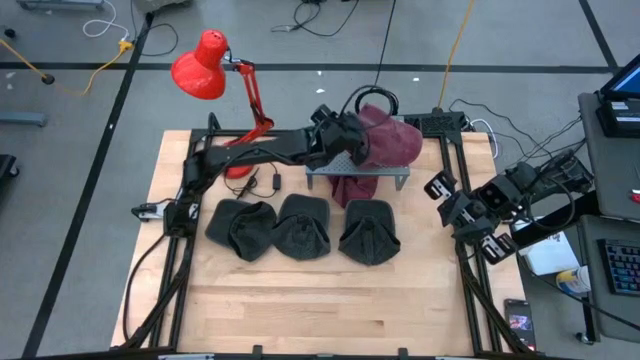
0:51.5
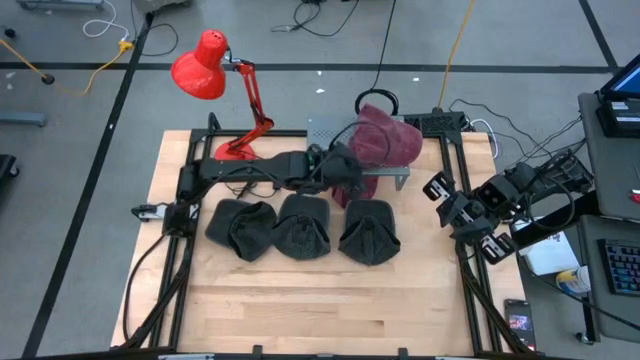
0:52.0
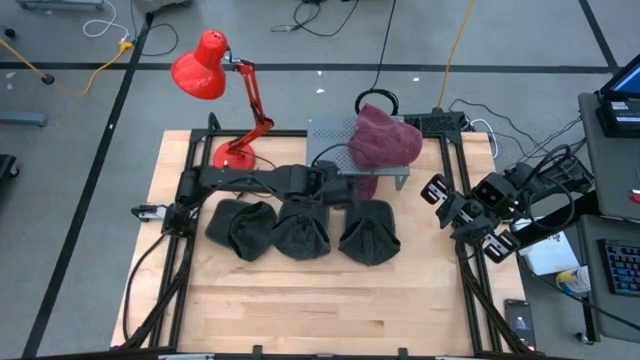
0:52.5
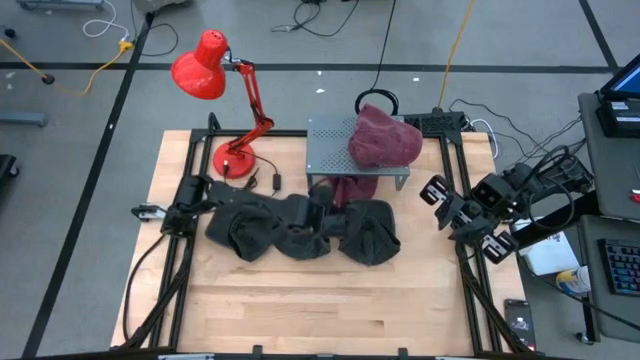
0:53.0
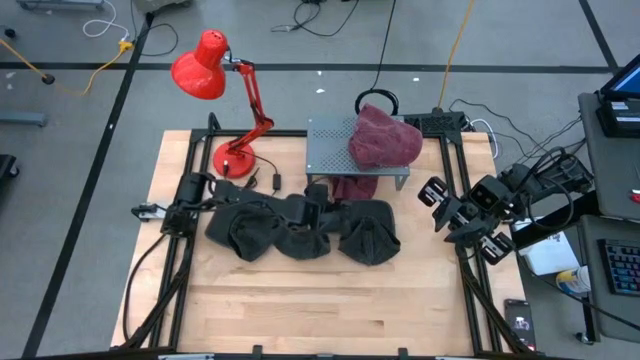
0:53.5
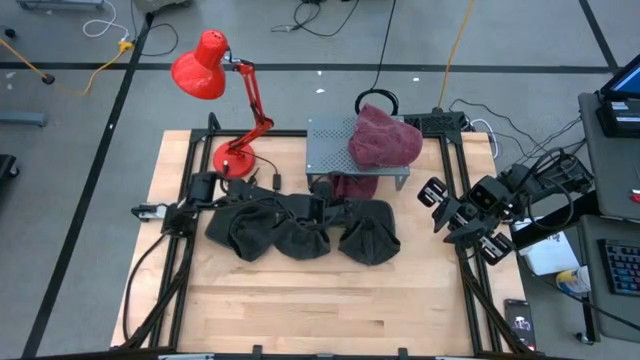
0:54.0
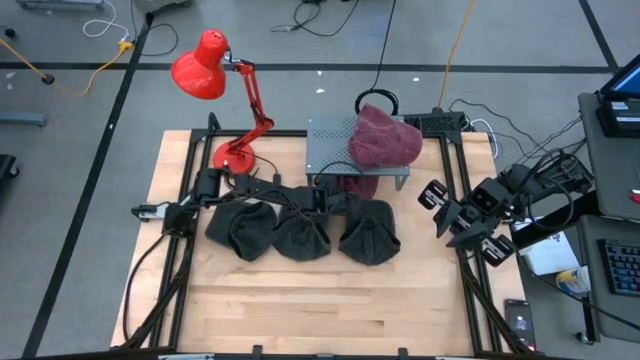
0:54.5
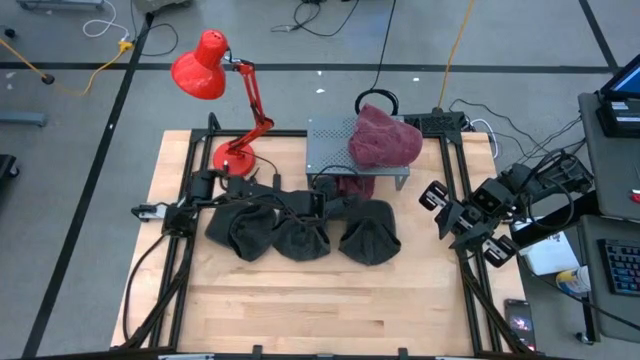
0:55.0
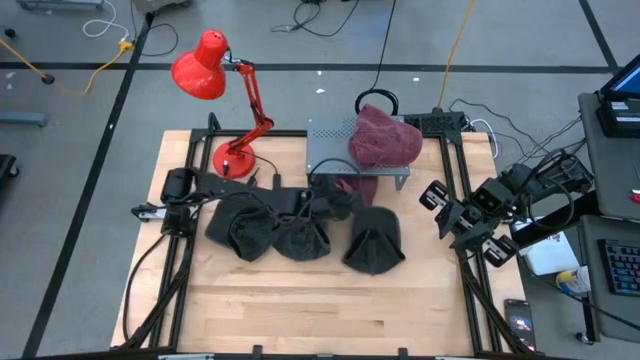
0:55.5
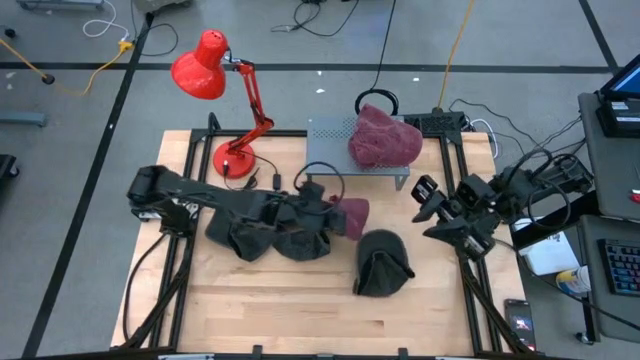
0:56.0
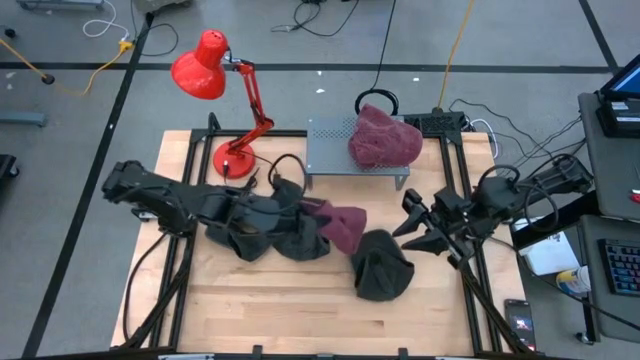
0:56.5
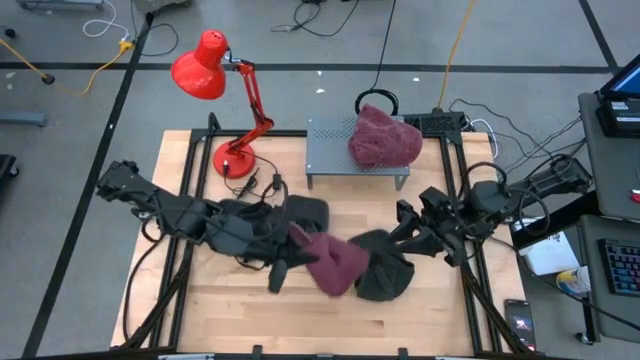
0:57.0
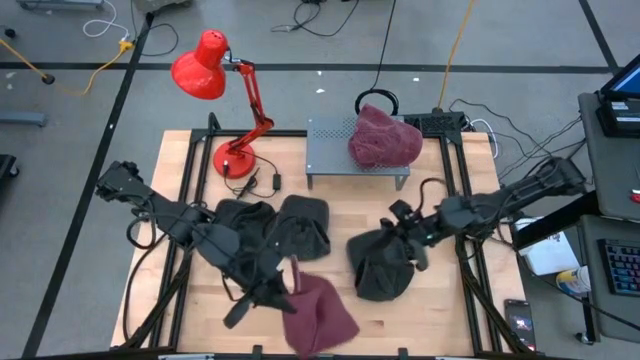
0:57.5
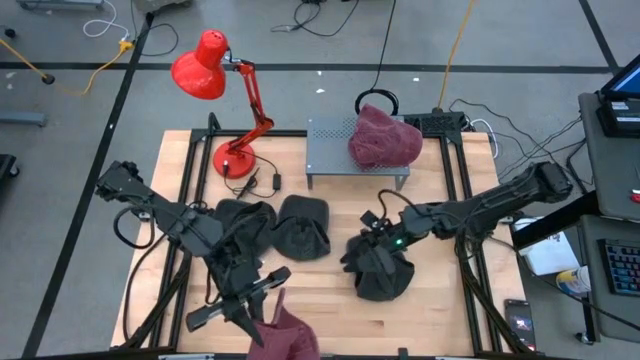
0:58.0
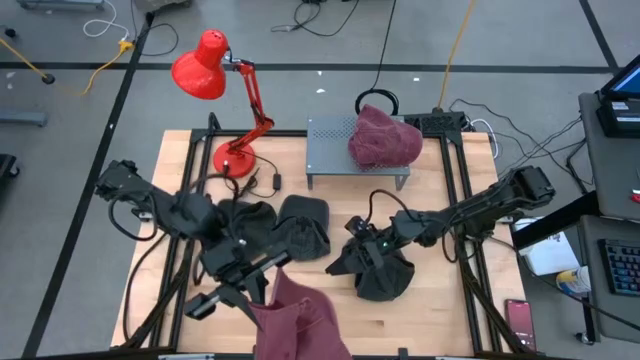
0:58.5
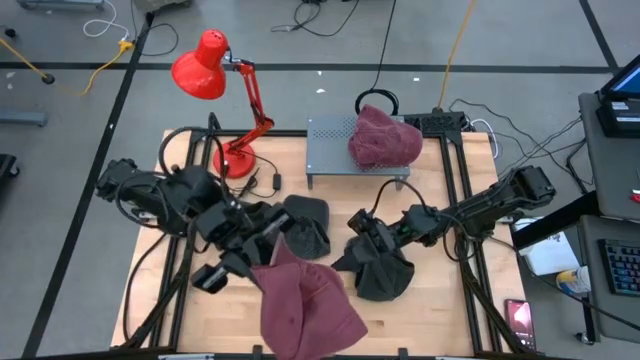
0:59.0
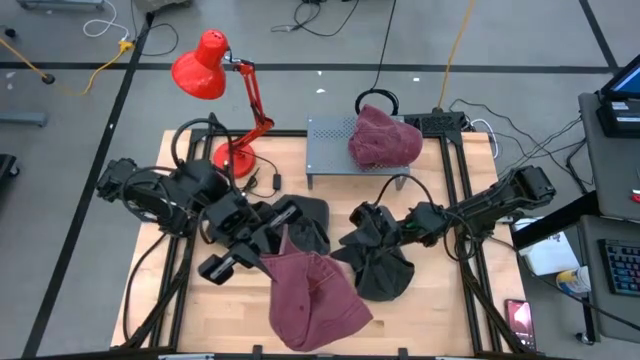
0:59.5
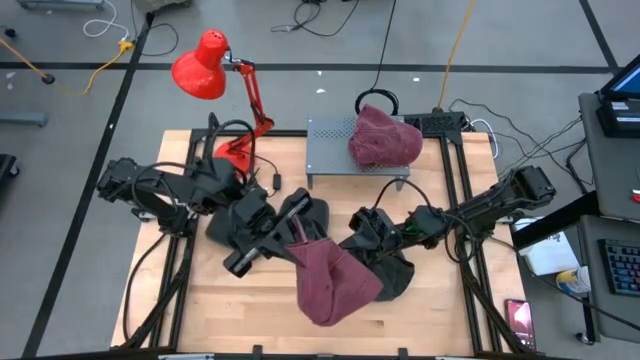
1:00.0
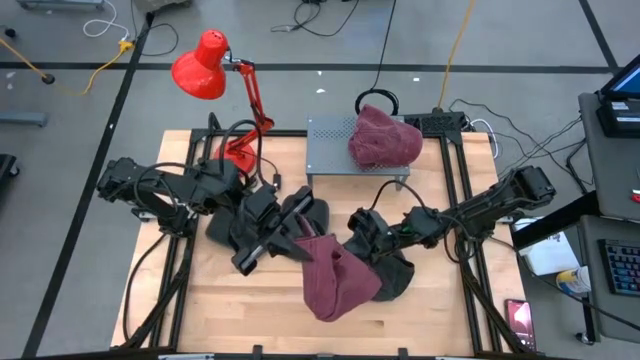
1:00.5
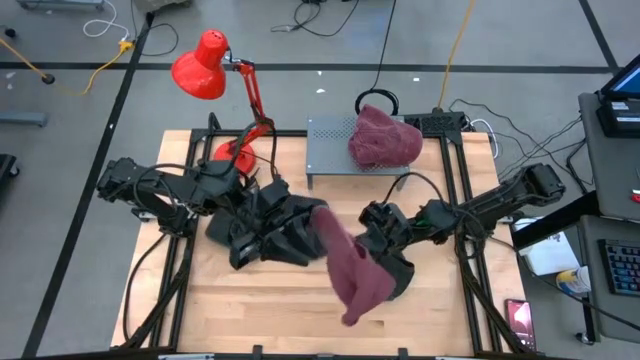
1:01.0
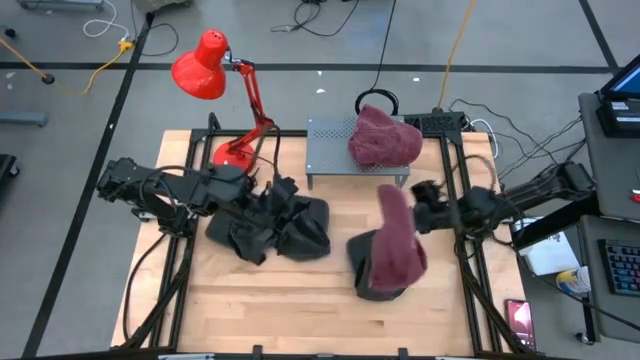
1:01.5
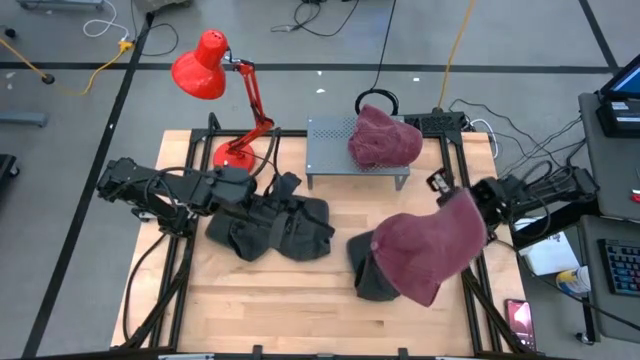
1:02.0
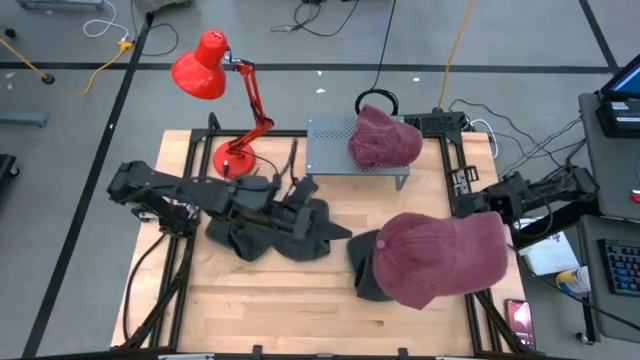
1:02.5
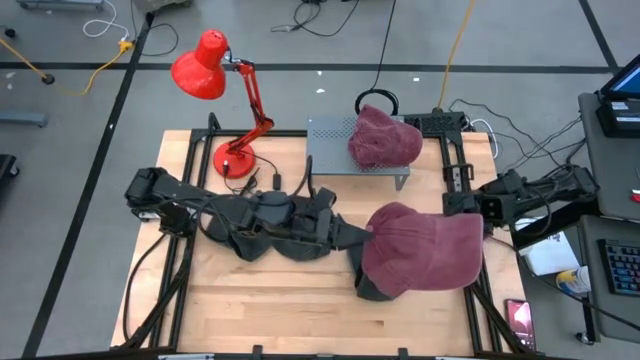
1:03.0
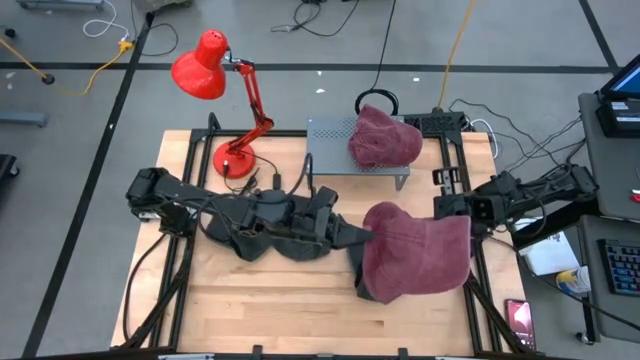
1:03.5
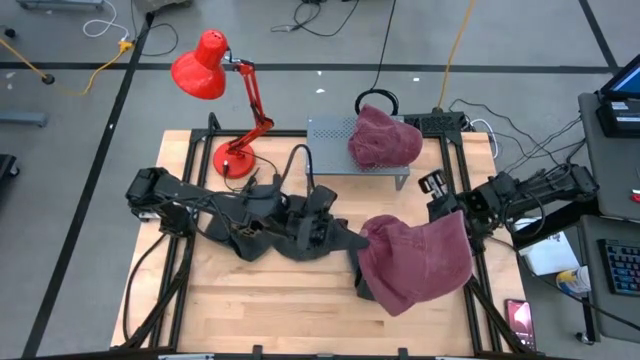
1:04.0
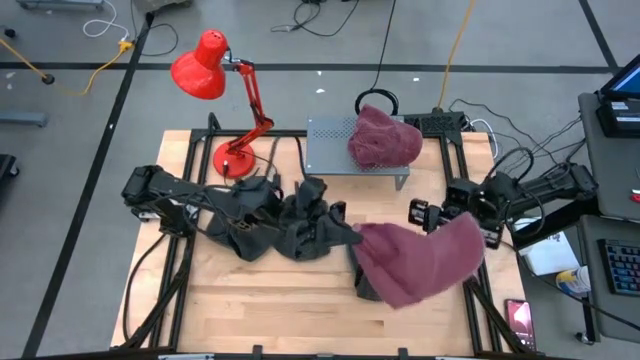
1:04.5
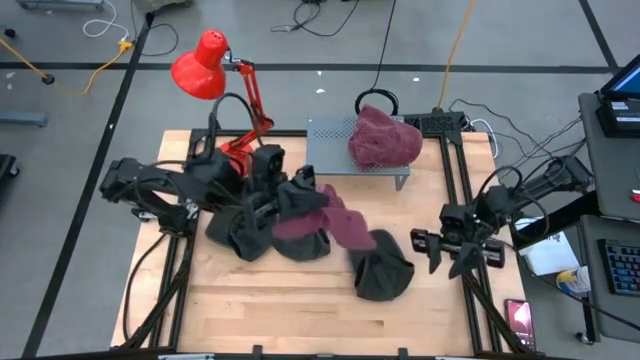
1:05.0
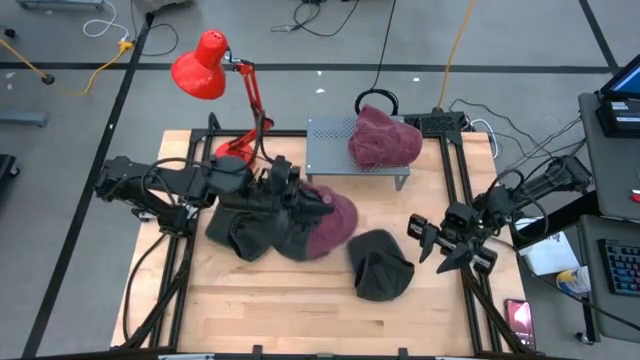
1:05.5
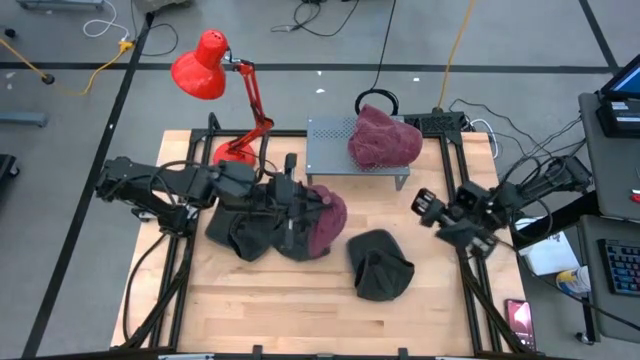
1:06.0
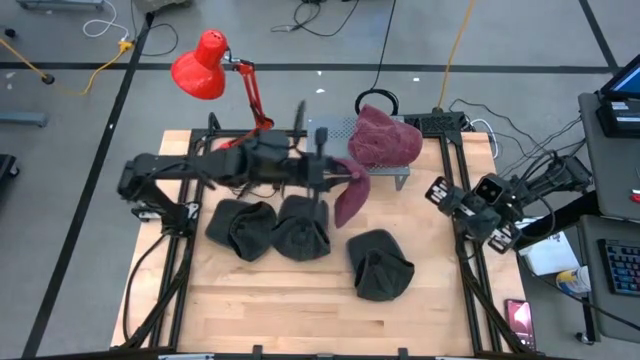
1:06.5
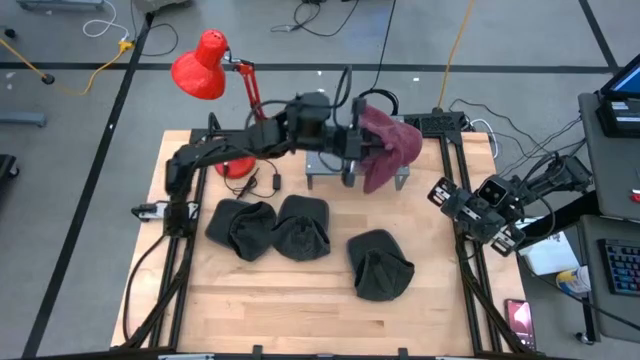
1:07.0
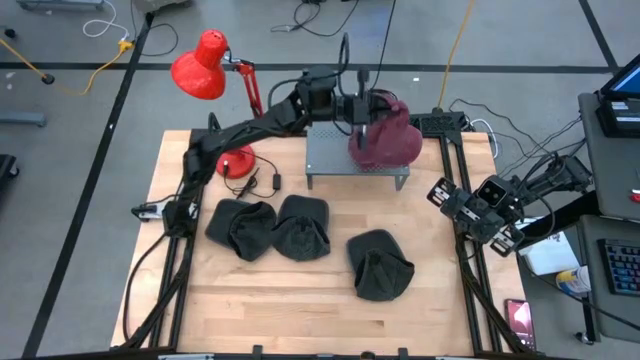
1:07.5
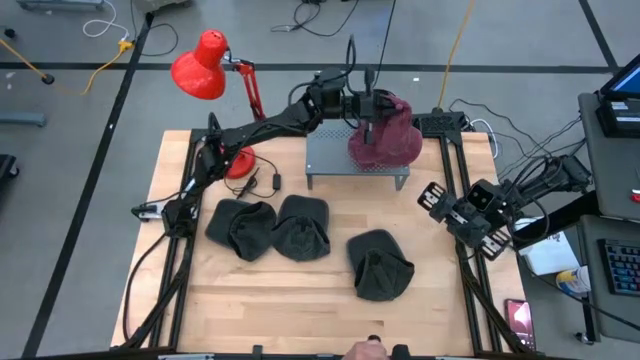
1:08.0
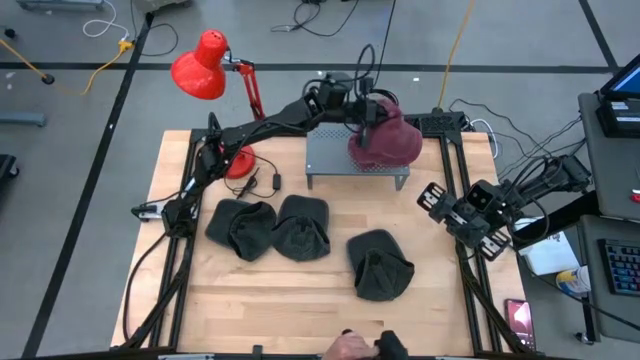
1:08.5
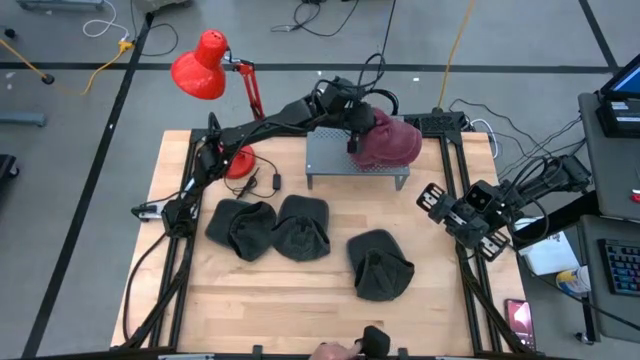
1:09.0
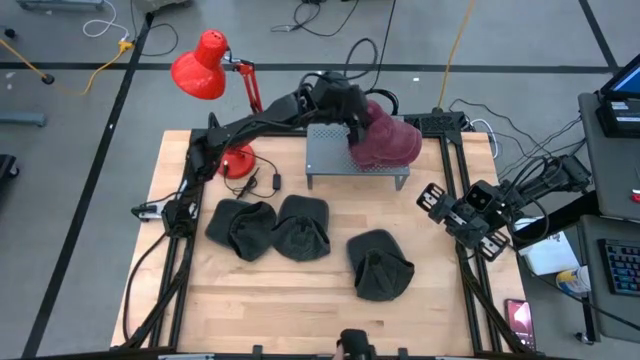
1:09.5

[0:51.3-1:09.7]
Task: Pick & Place hat
Stack the red cap on the red cap on the shelf

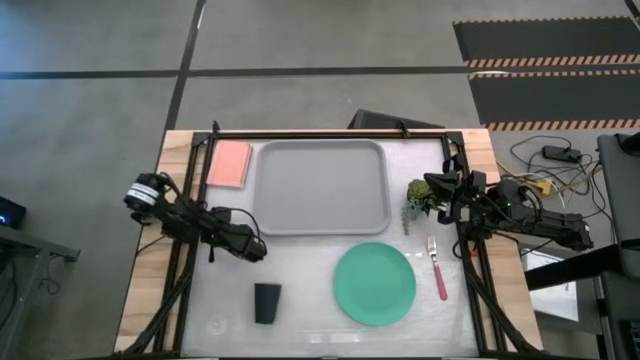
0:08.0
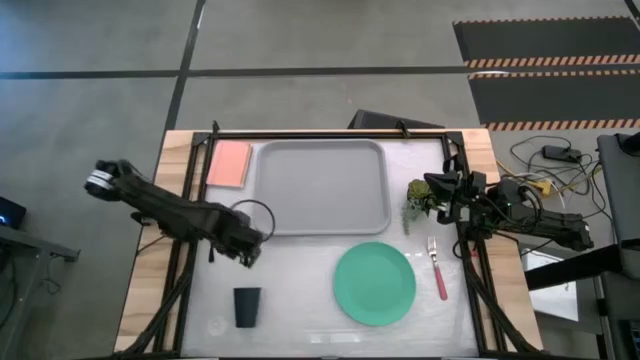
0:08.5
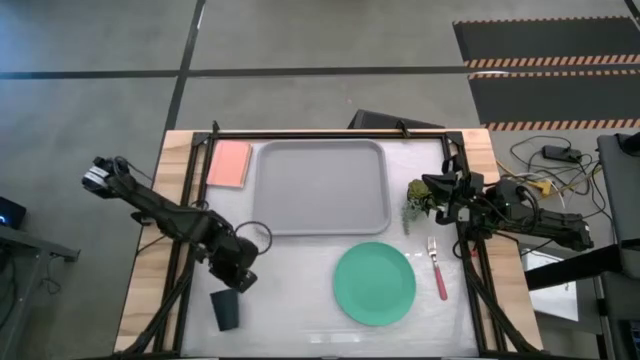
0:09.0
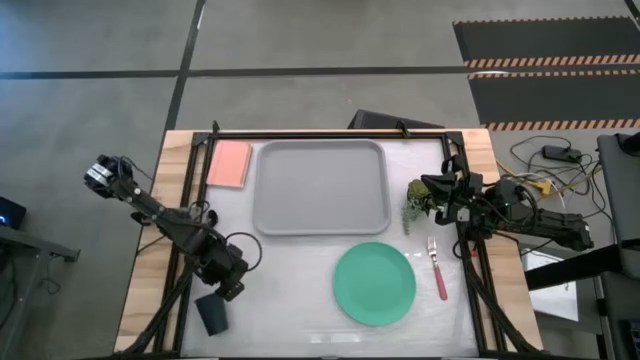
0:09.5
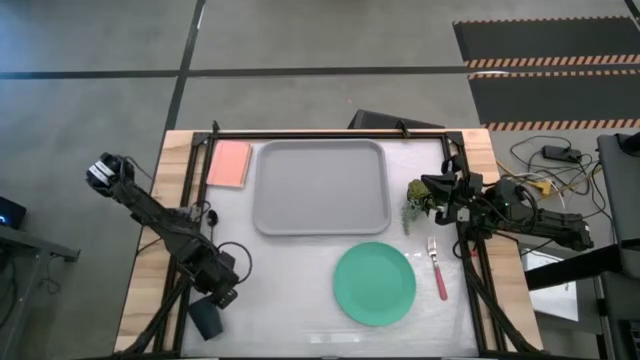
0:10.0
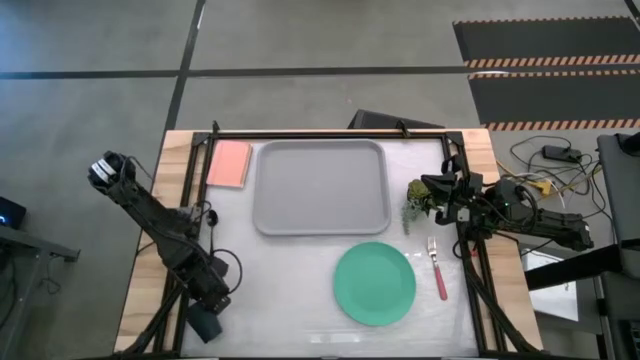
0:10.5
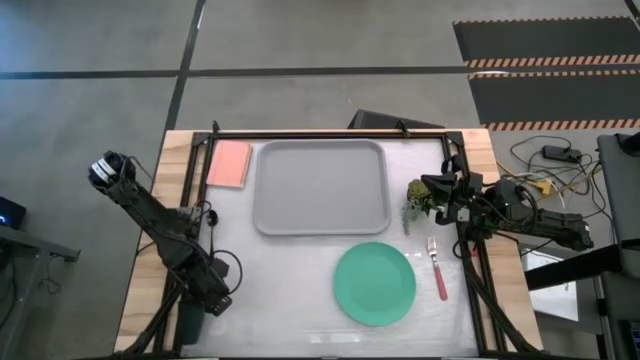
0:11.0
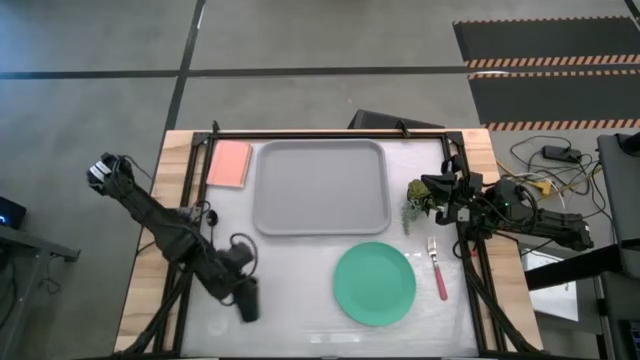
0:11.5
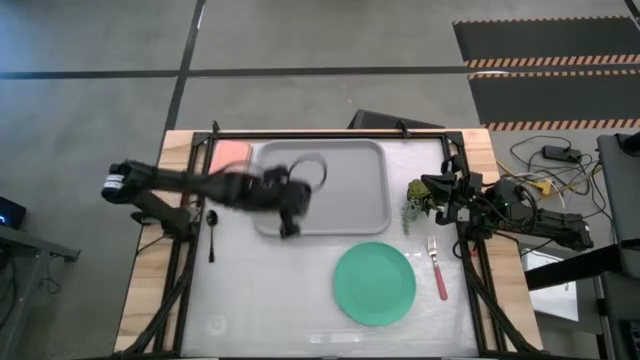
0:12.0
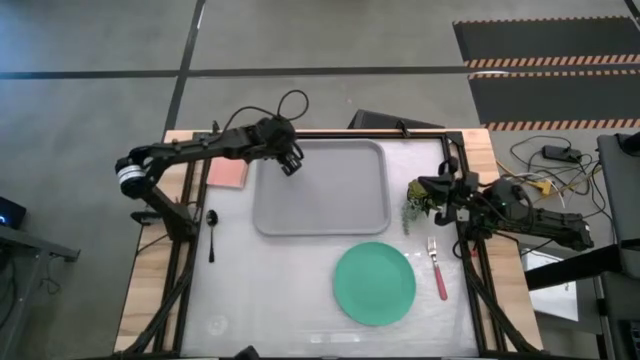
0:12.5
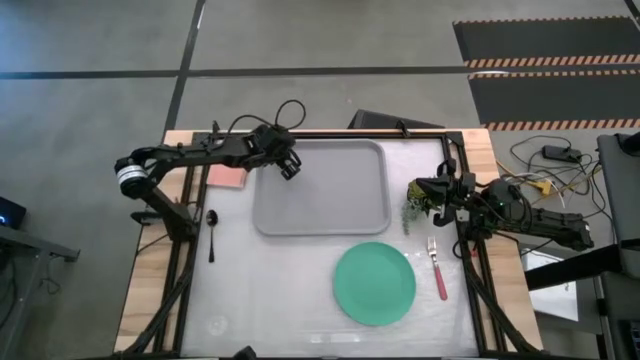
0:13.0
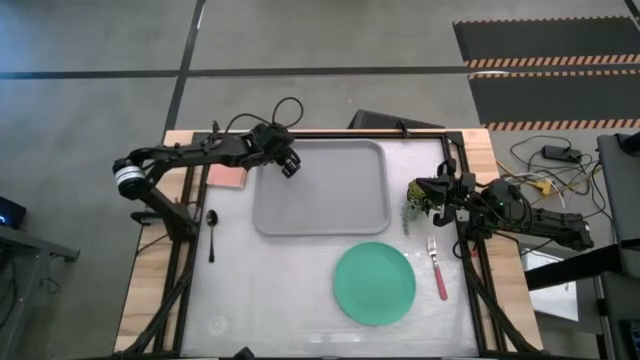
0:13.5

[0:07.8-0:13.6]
Task: Pick and place plate/cup/fork/spoon on tray
Put the black cup on the gray serving tray
